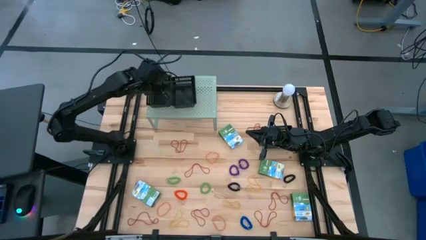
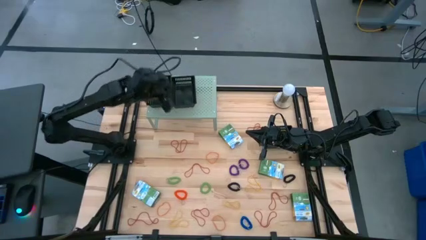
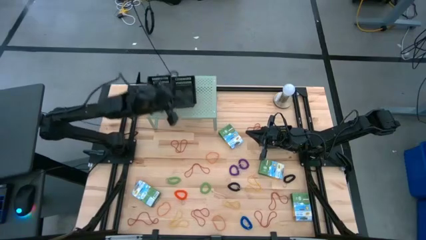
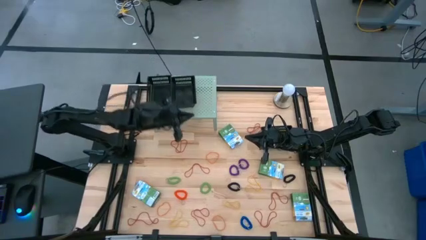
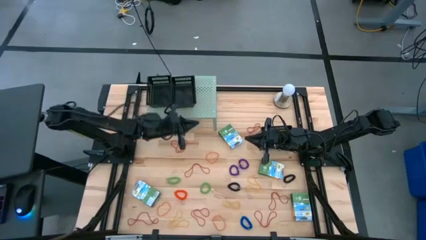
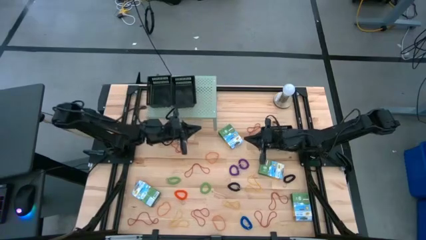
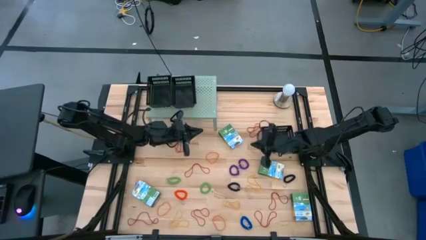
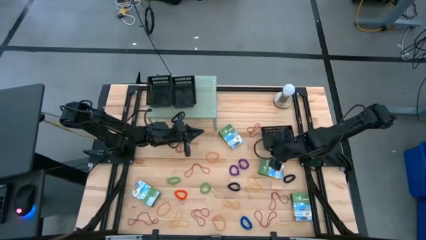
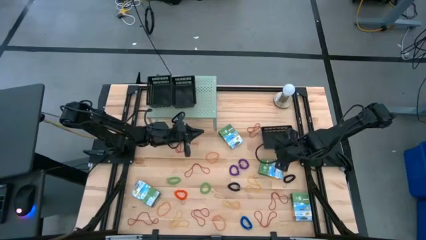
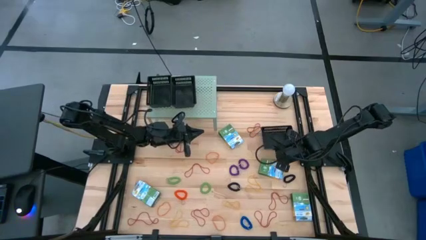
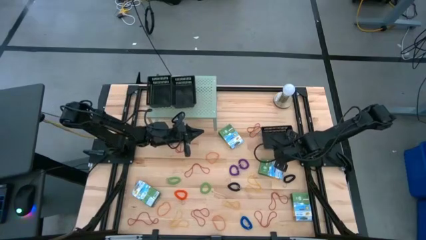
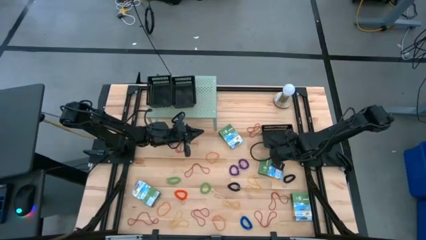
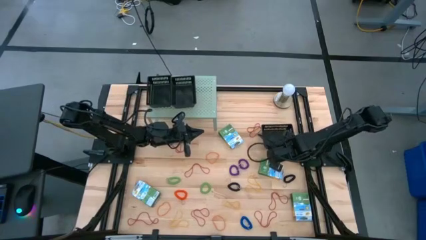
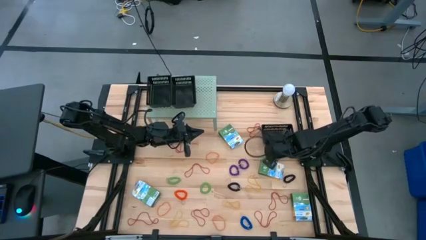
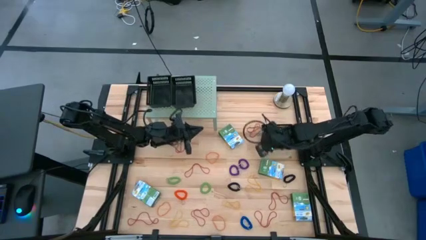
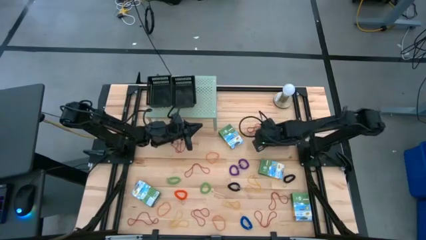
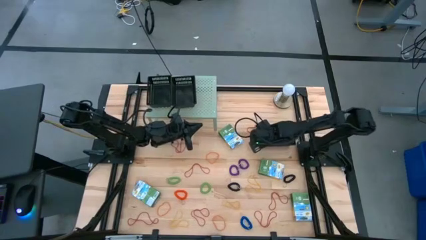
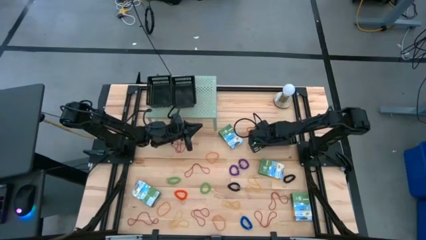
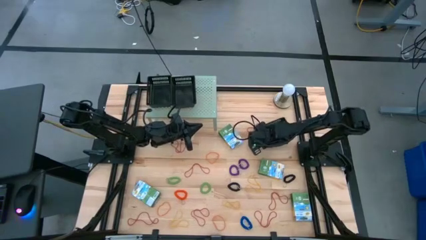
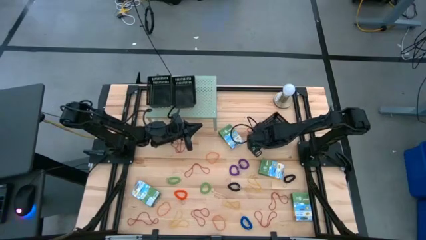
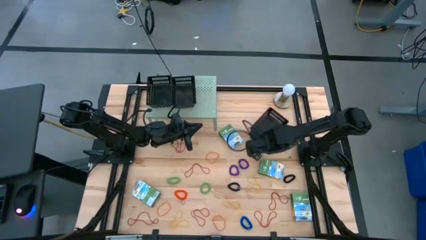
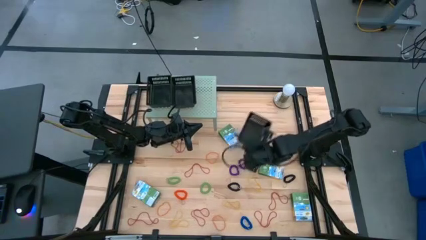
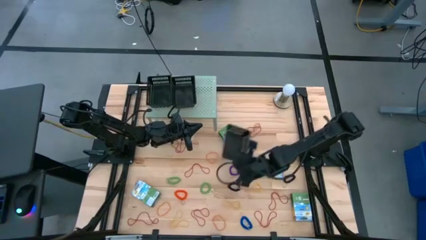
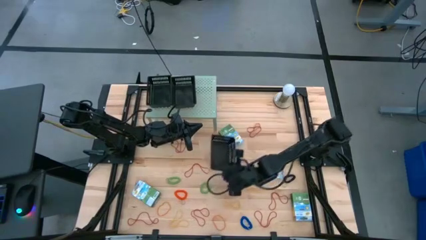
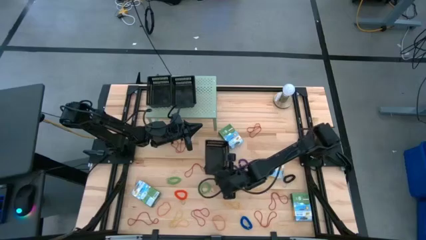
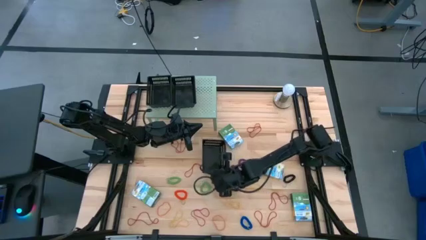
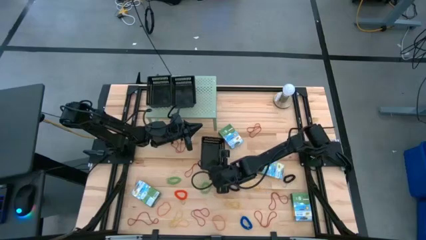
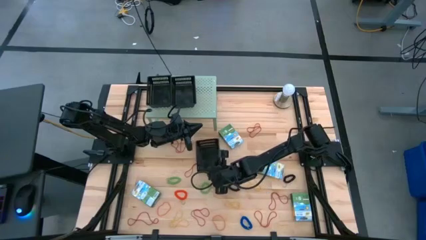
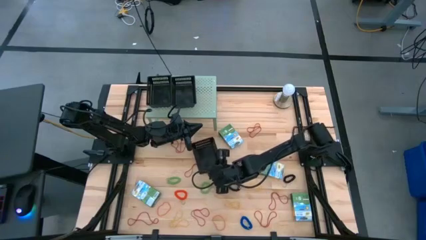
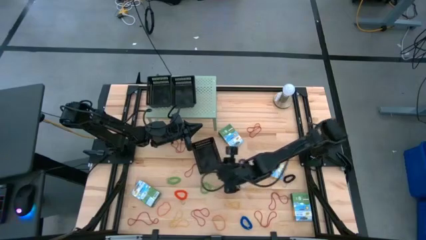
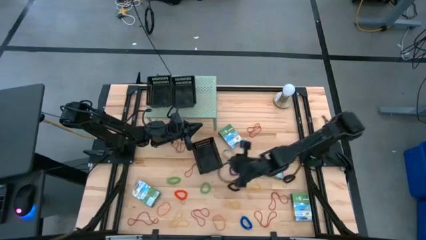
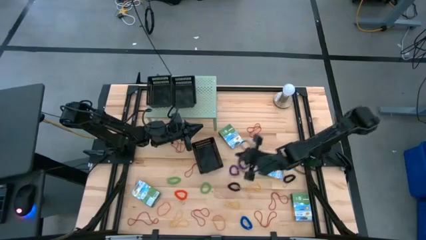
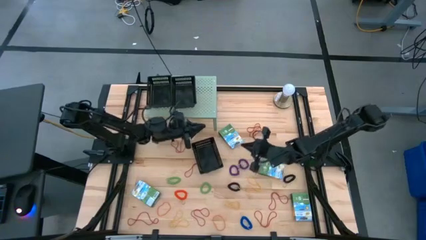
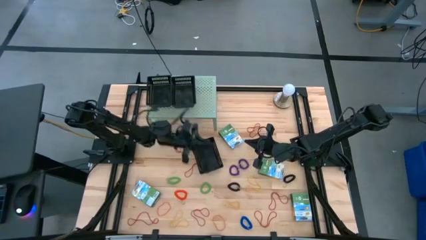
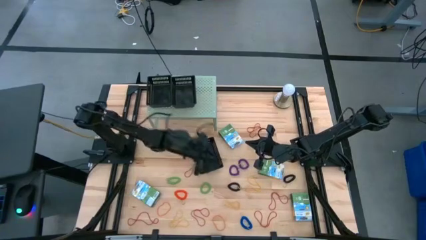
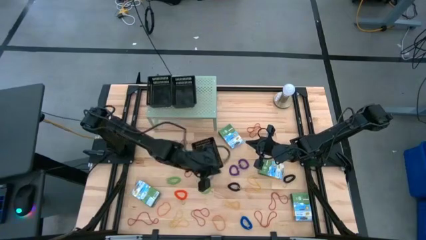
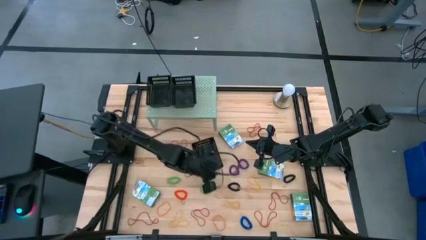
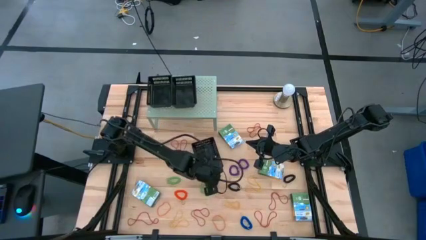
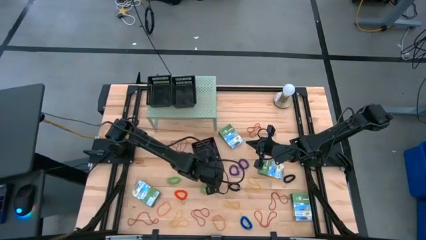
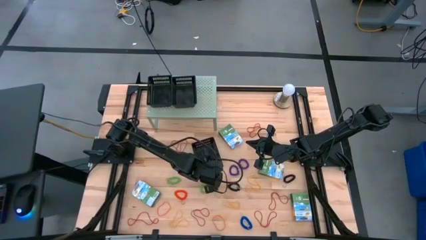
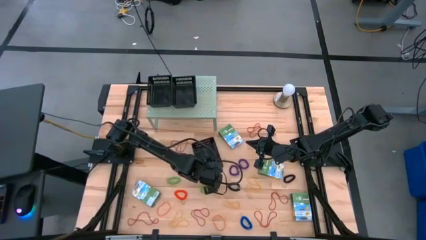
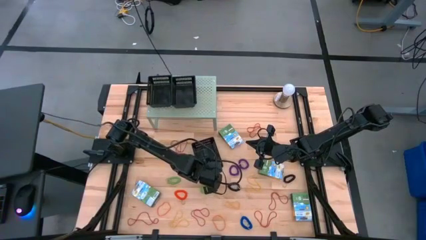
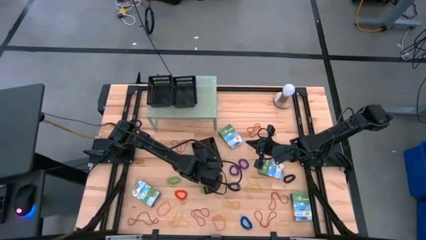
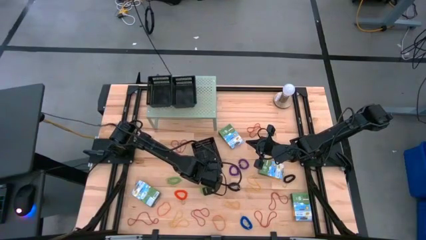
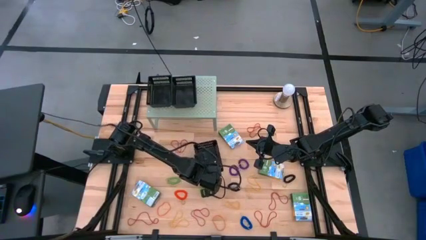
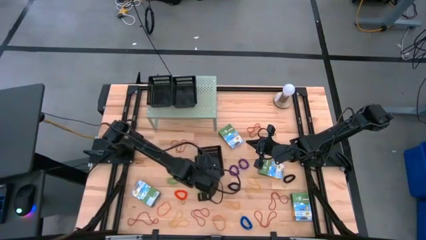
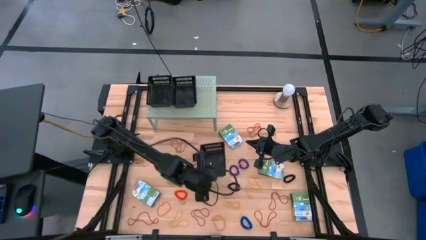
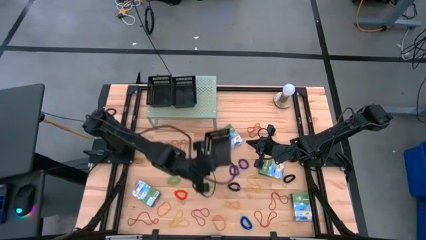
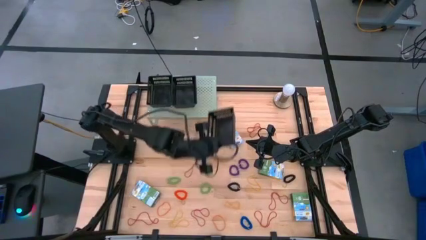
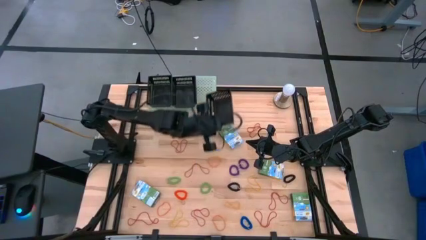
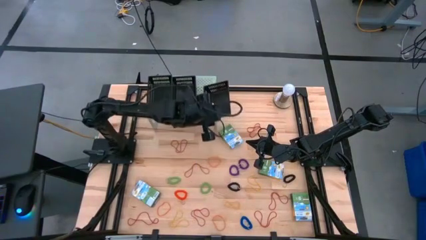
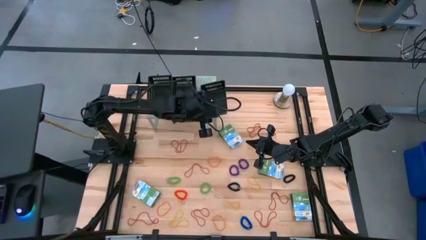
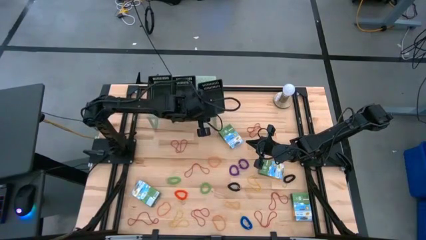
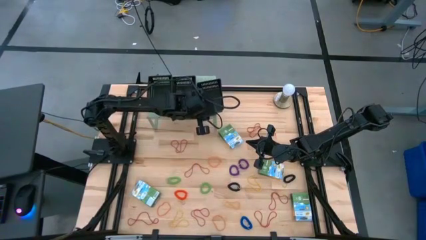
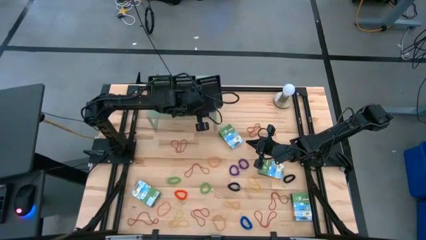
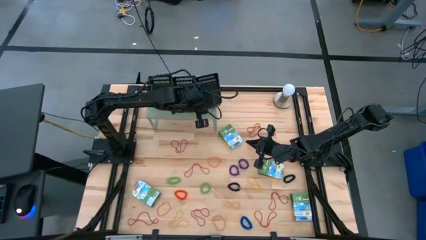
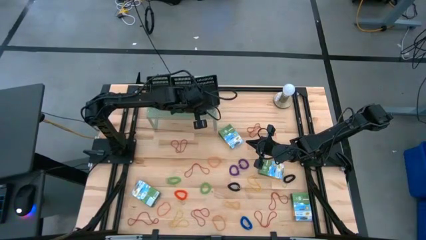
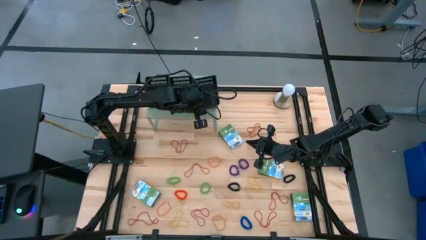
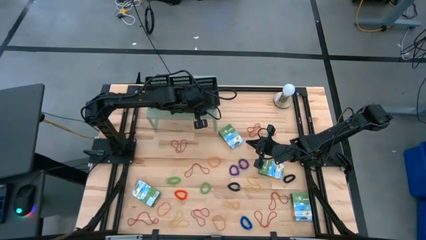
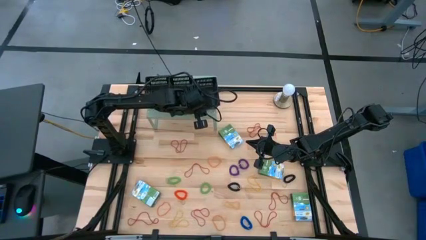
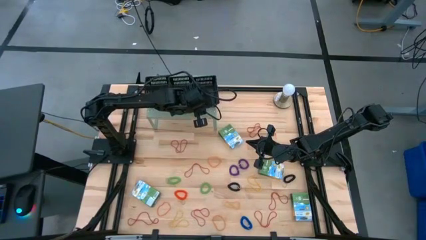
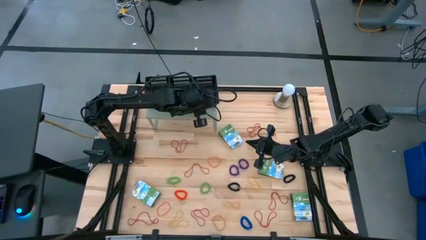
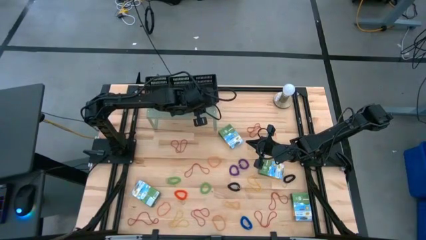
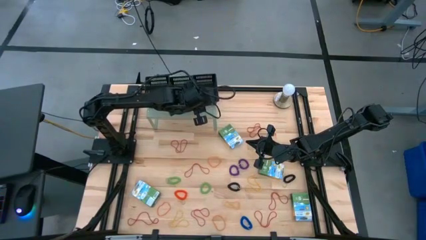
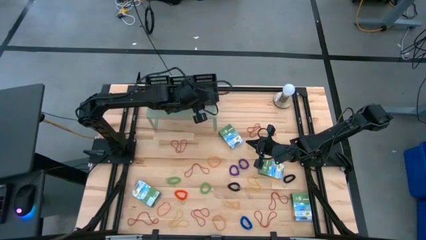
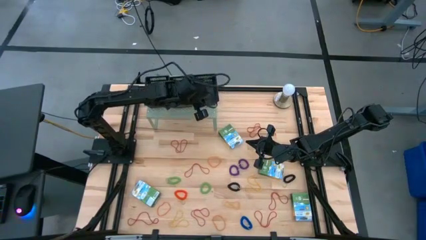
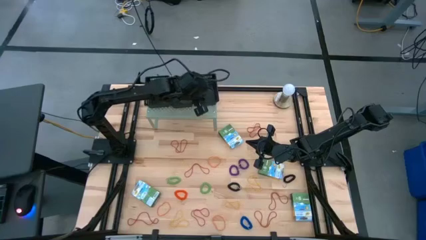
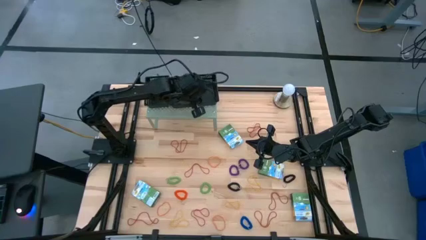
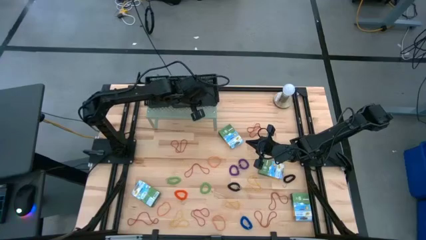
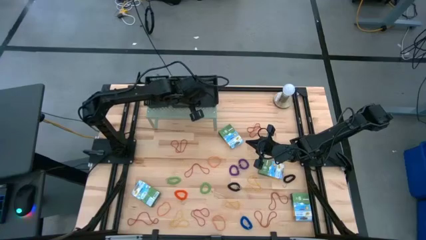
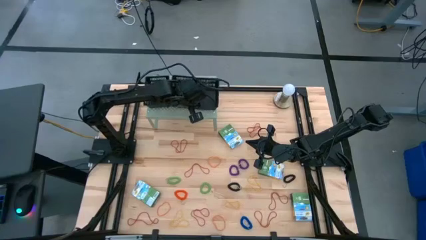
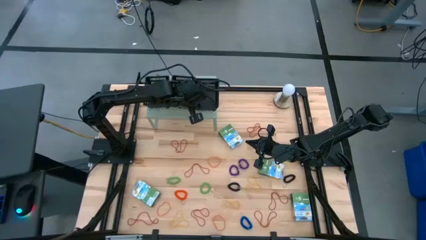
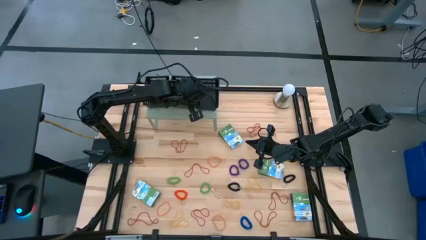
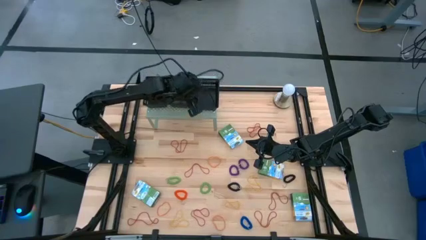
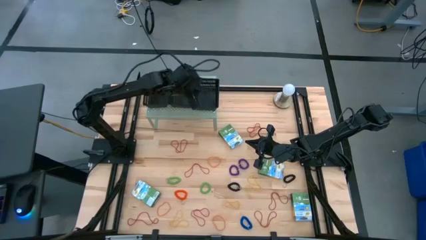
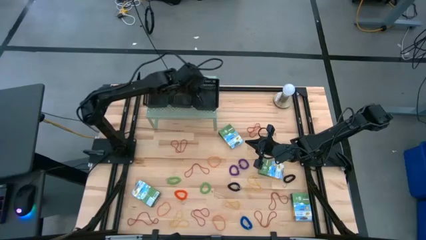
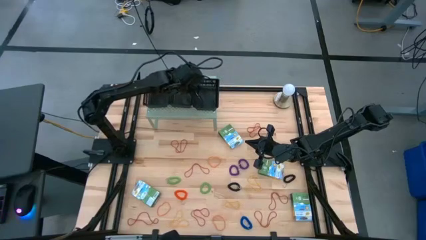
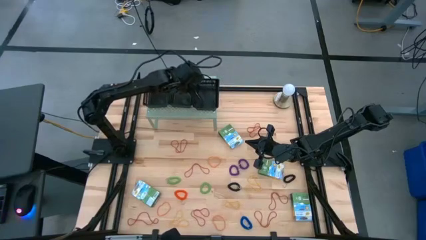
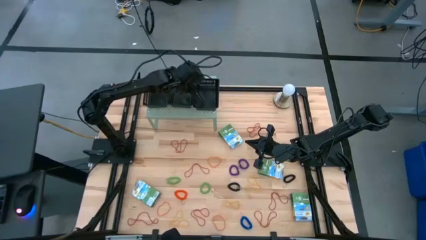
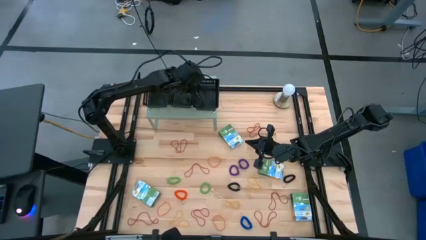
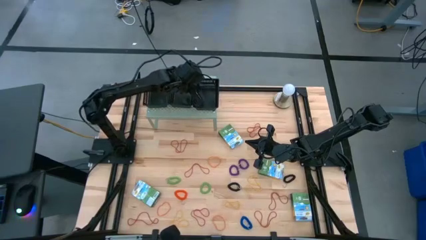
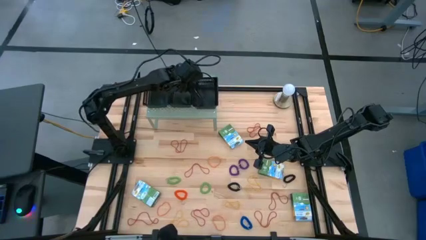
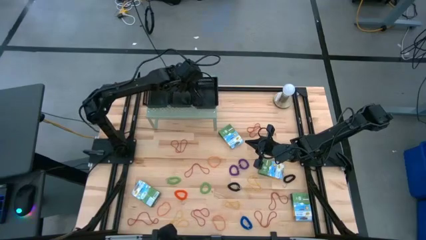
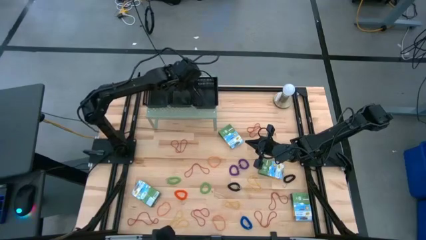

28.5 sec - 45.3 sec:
Task: Pick & Place Office Desk Supplies
Put the black bin on the shelf
